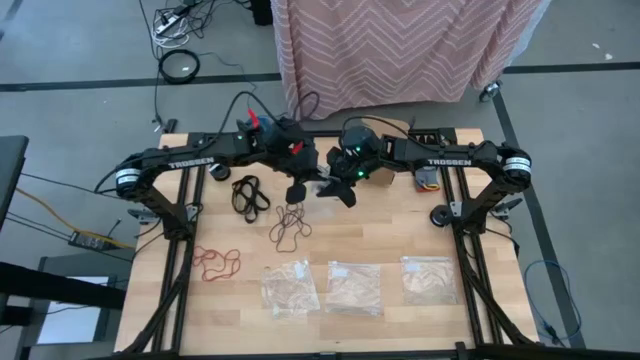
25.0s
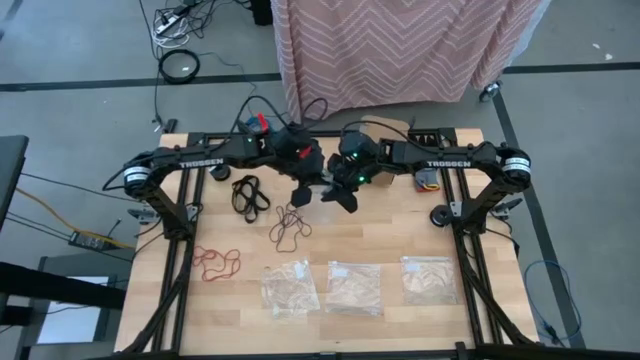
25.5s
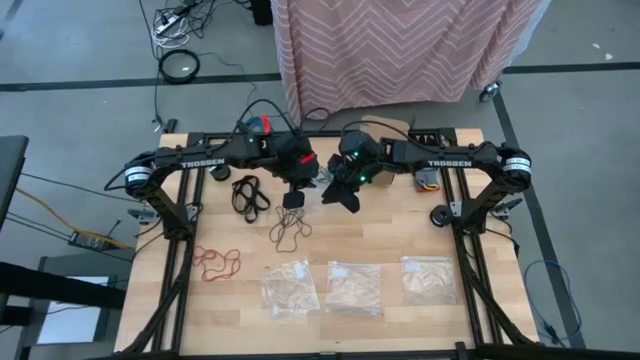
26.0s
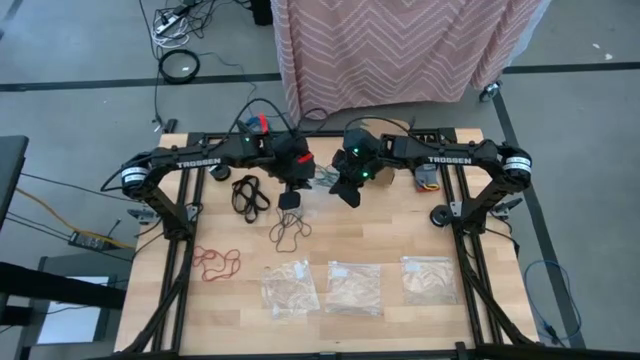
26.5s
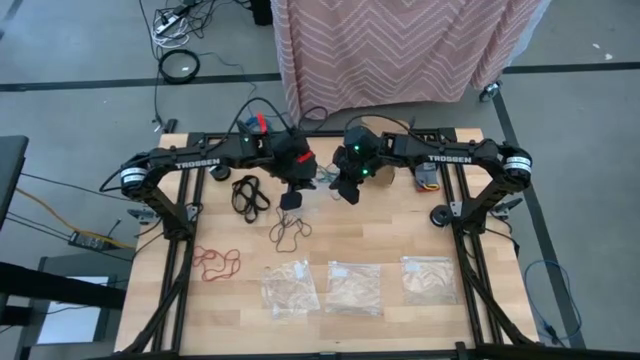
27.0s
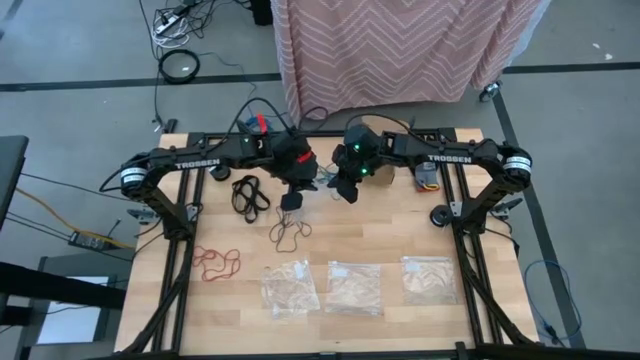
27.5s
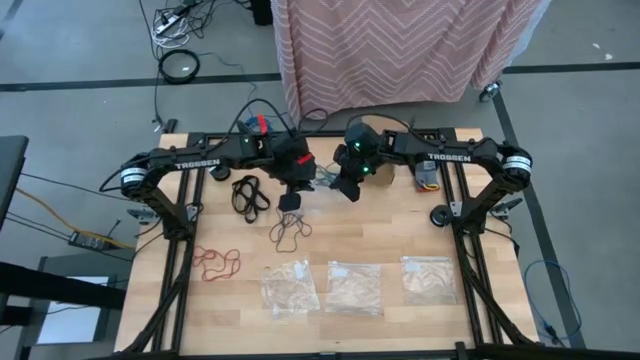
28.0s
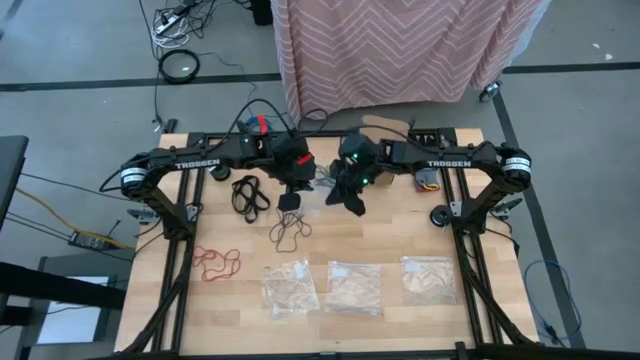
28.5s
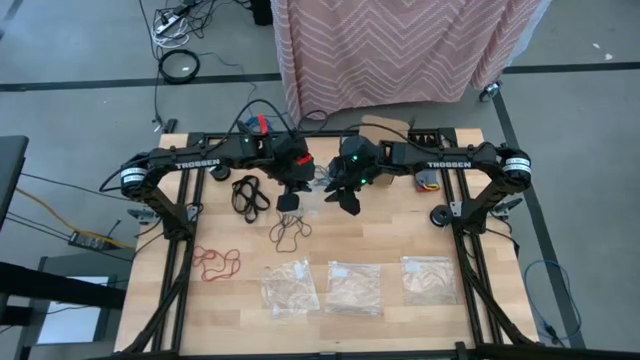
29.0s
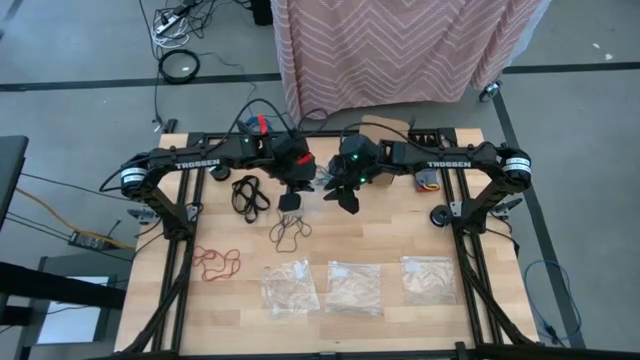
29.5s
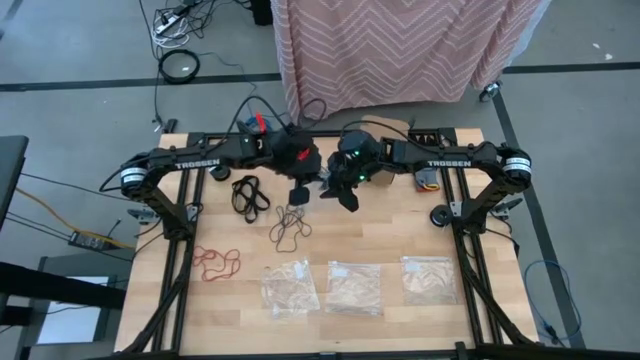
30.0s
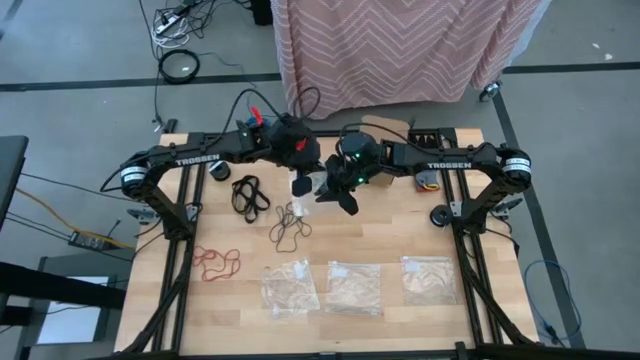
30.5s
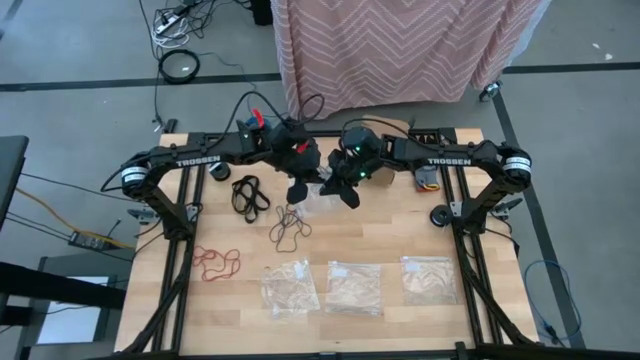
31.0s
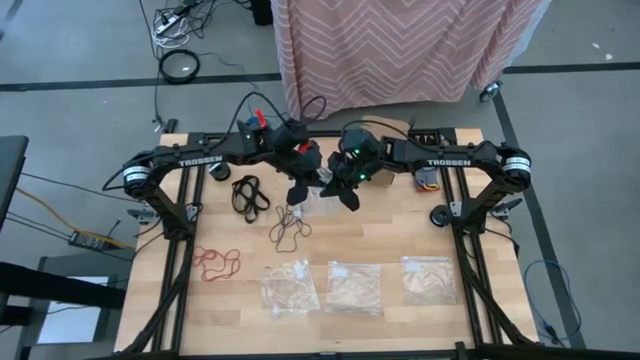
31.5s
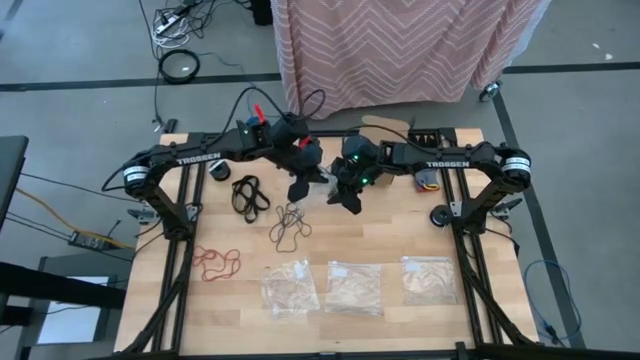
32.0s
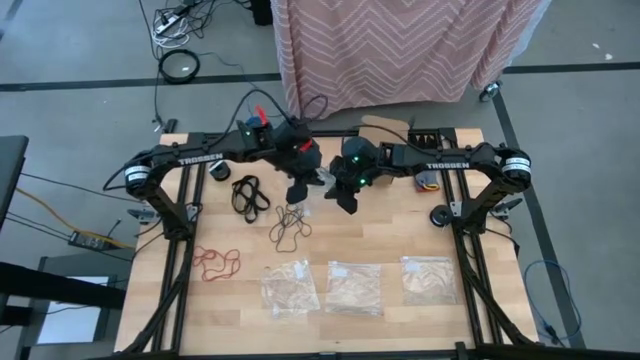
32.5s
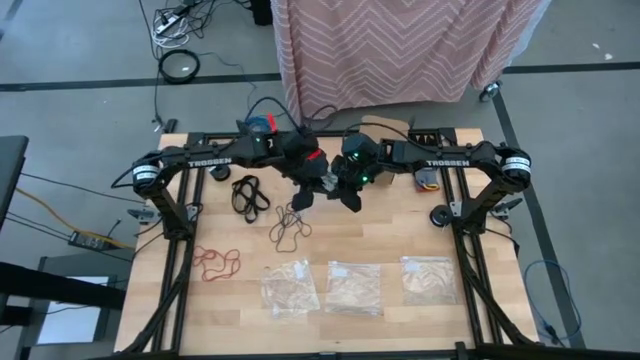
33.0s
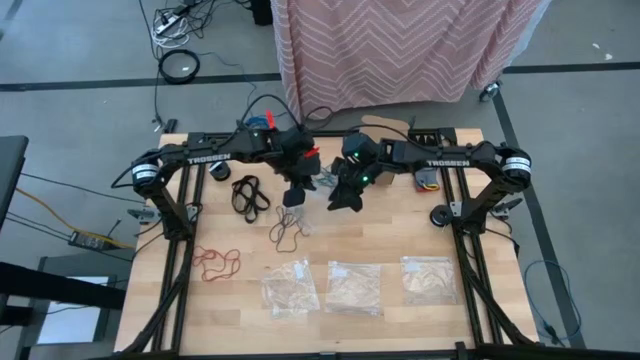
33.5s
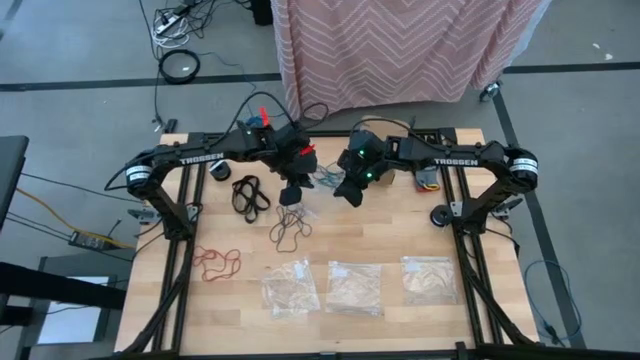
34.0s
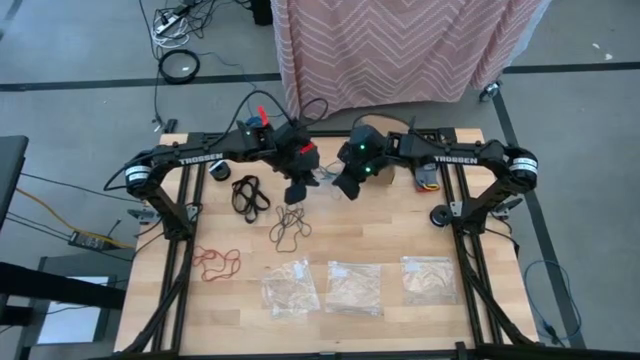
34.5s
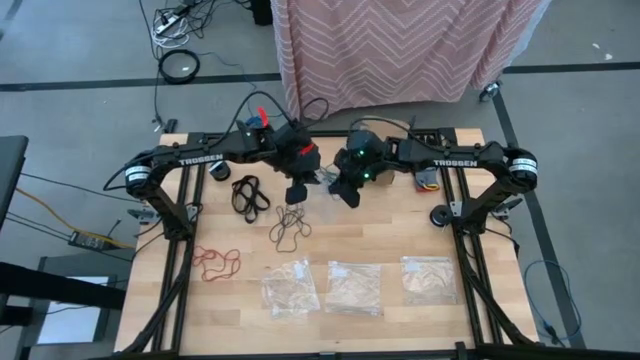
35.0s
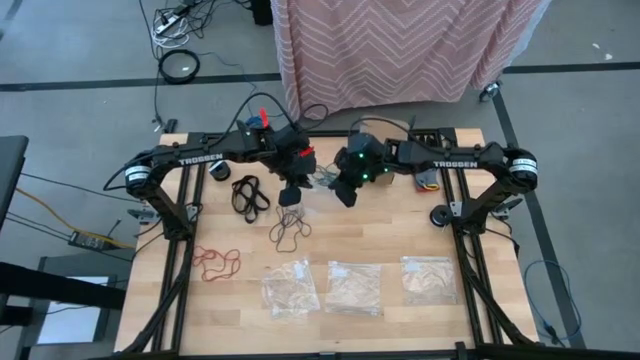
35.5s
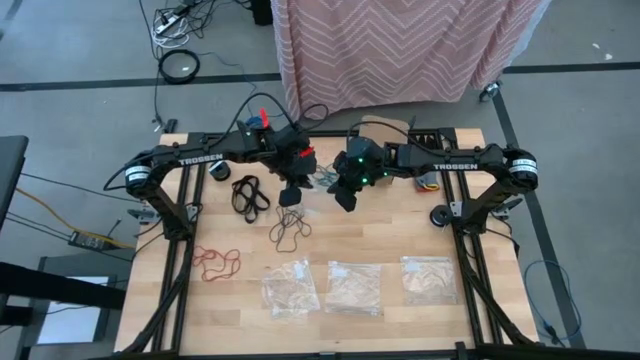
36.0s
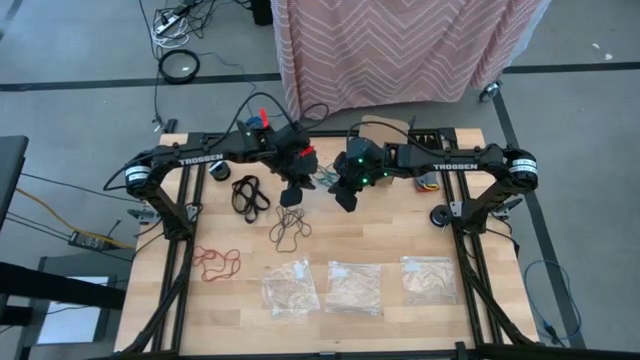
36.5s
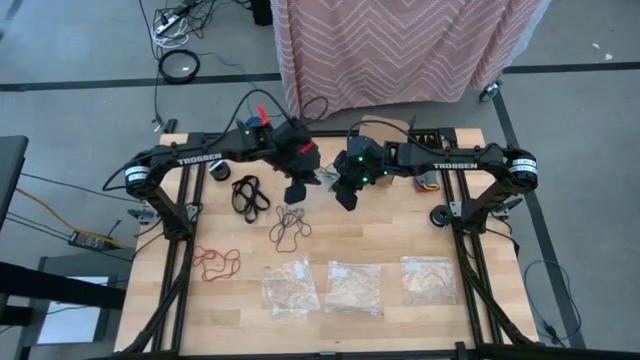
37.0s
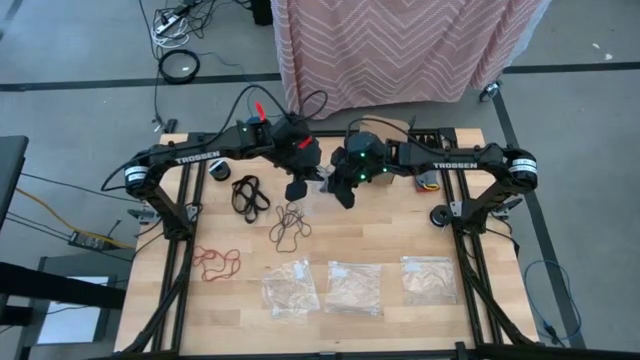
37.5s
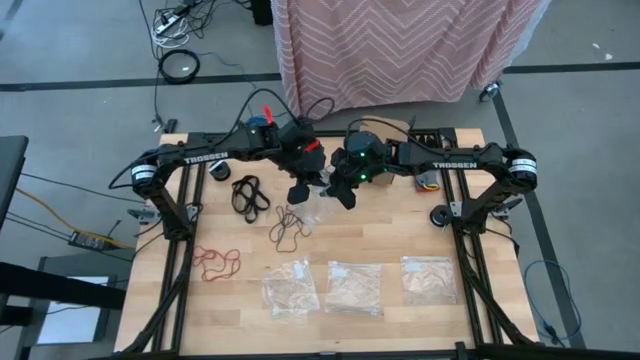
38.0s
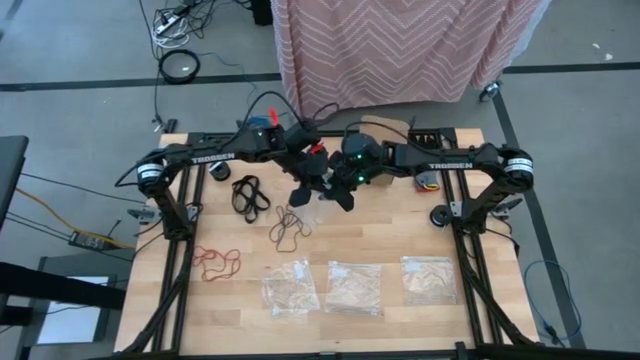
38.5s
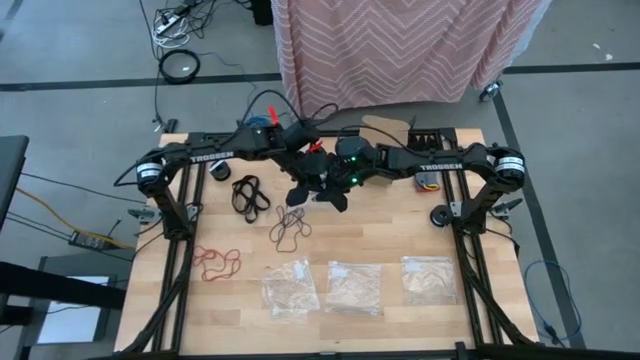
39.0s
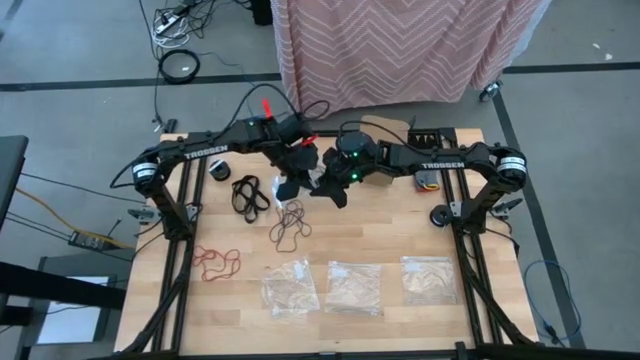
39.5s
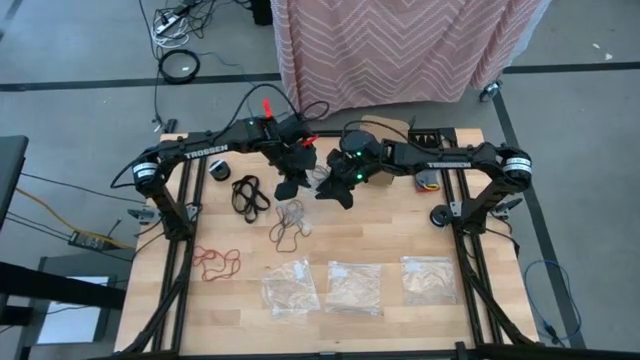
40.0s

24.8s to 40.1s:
Task: Sort rubber bands
Open the top transparent zip bag

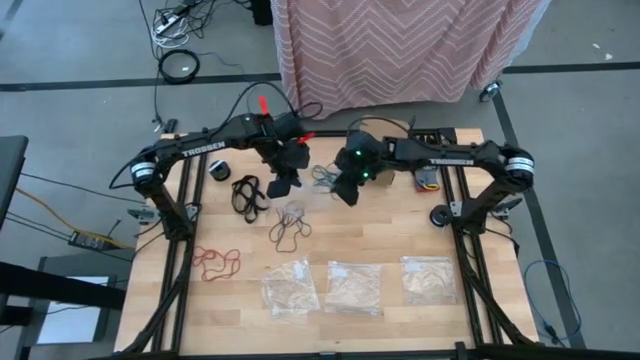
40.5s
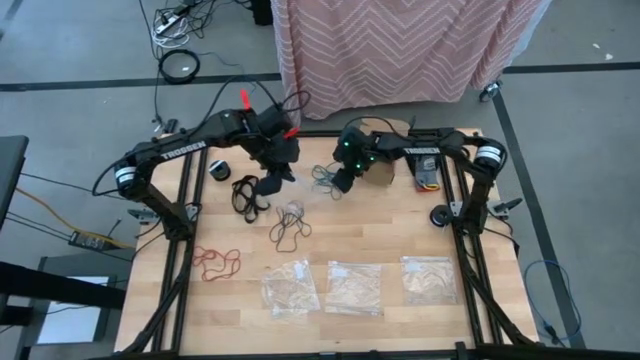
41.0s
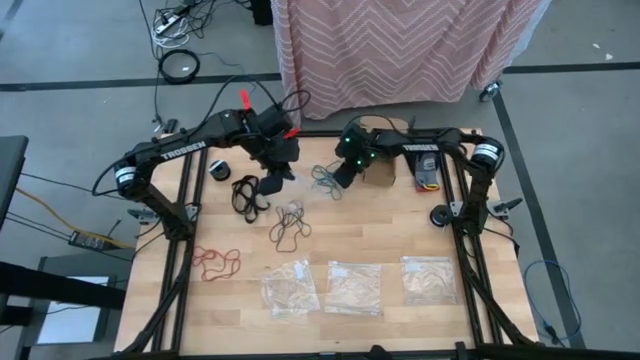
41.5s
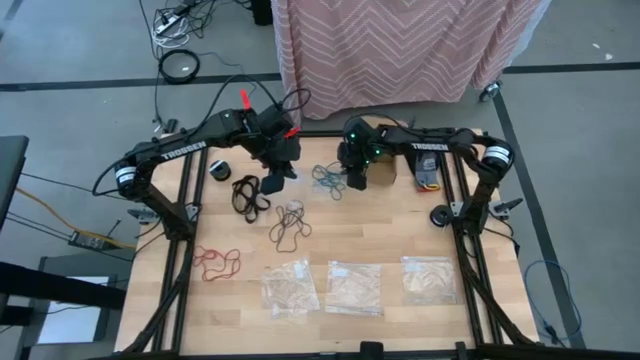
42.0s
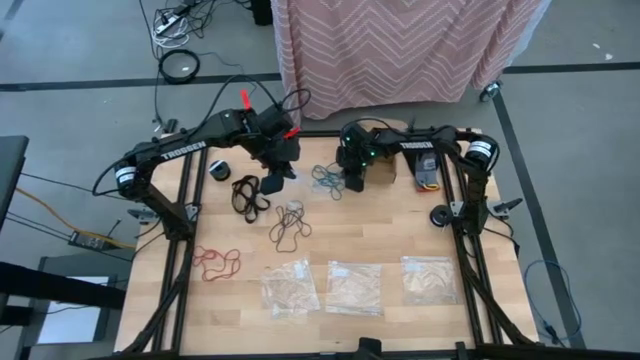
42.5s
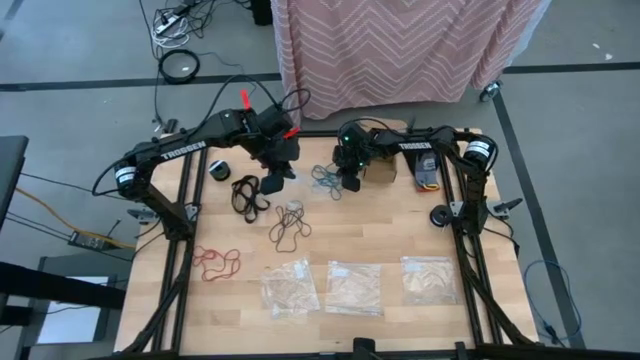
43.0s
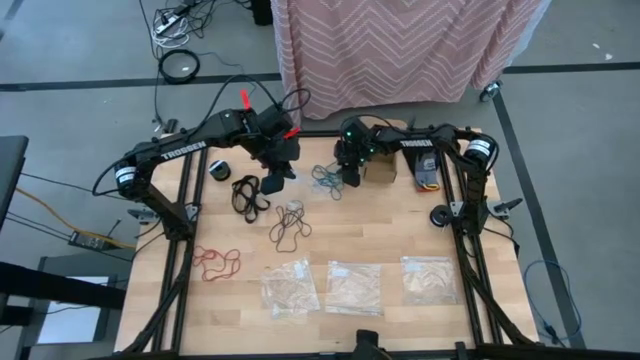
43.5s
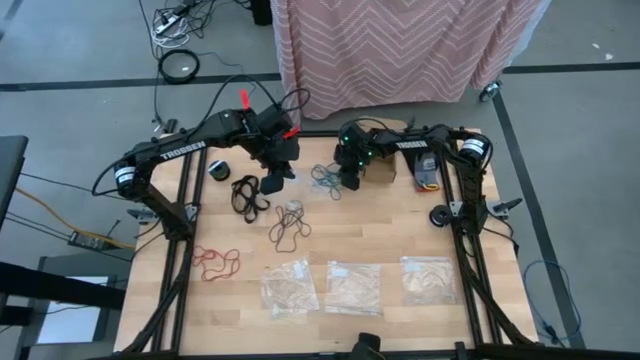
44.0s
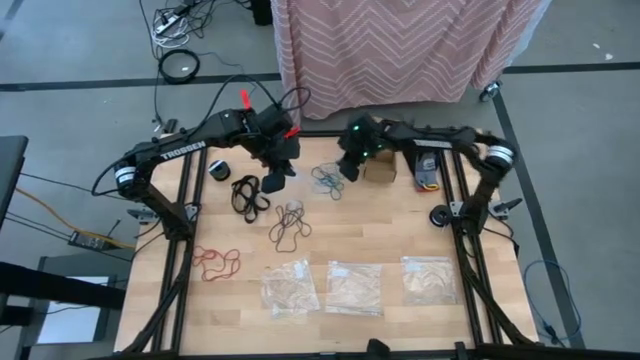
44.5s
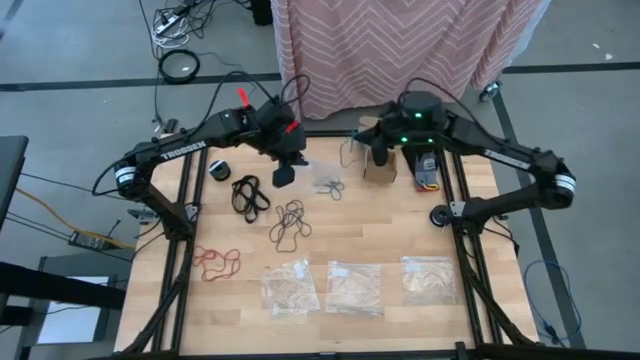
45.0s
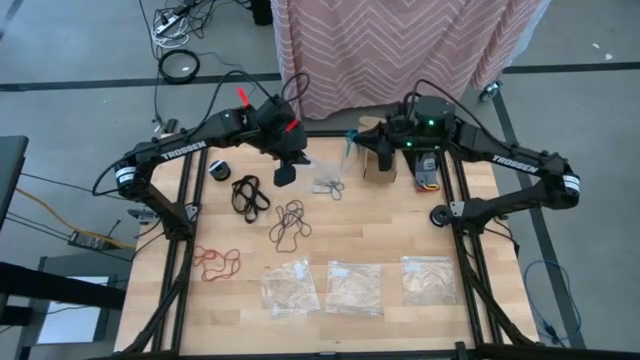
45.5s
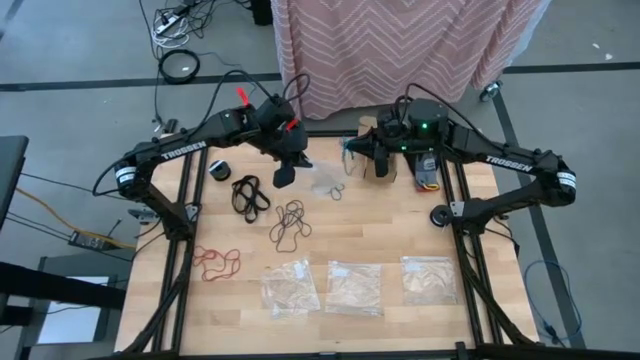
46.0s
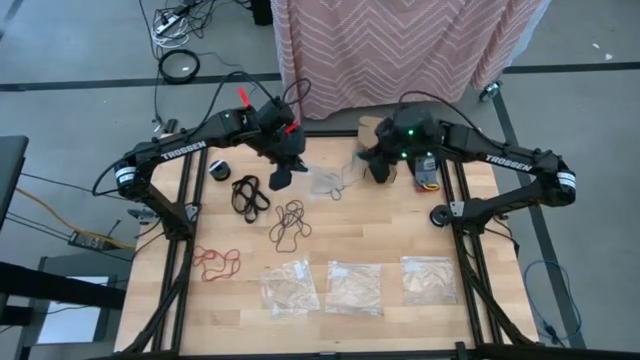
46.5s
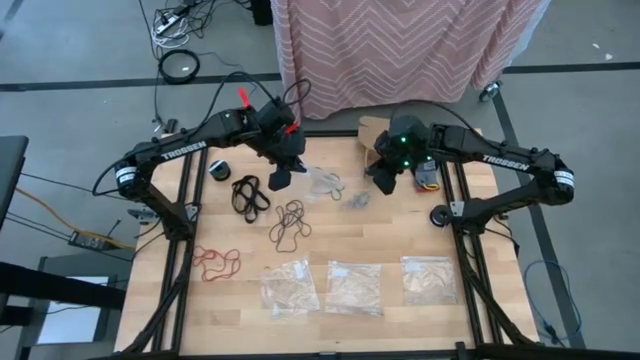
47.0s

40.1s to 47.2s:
Put the blue rubber band into the top transparent zip bag
